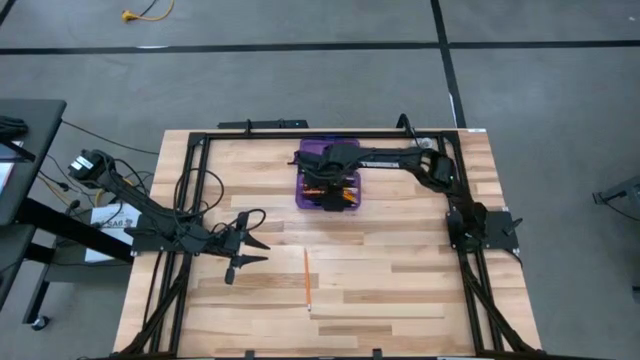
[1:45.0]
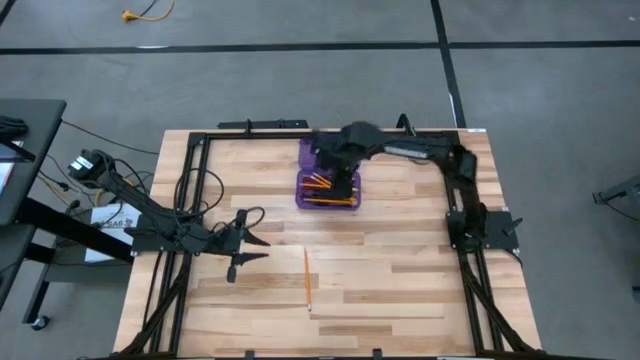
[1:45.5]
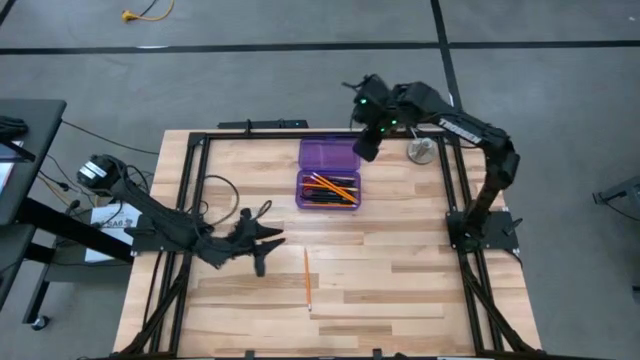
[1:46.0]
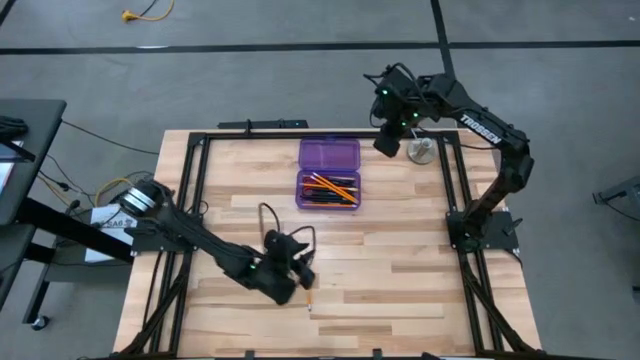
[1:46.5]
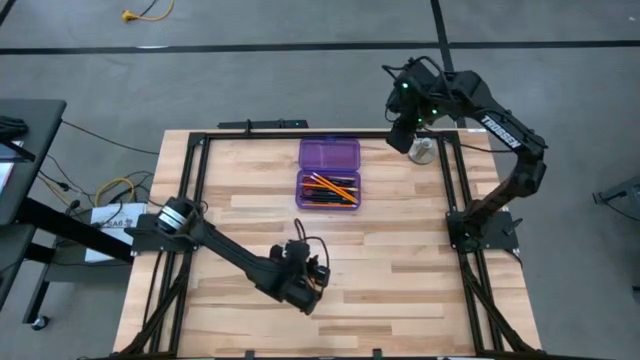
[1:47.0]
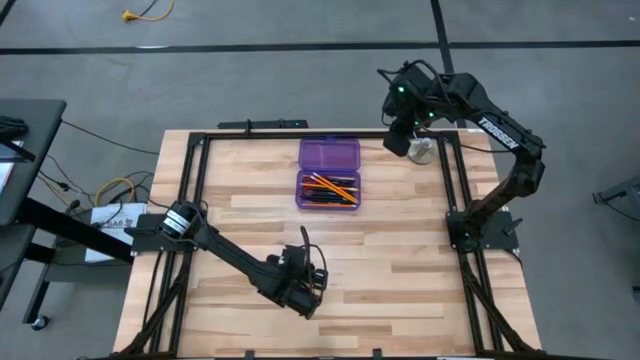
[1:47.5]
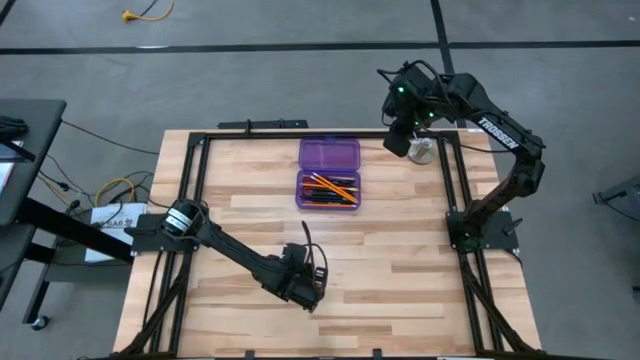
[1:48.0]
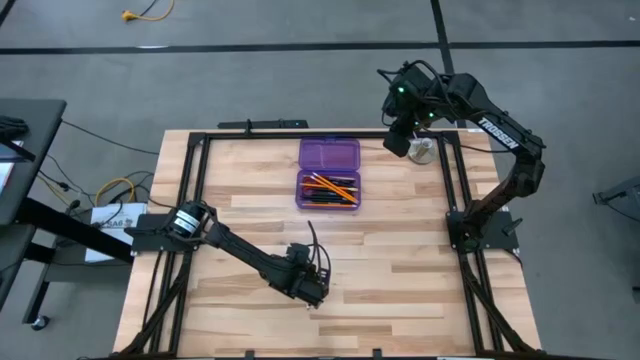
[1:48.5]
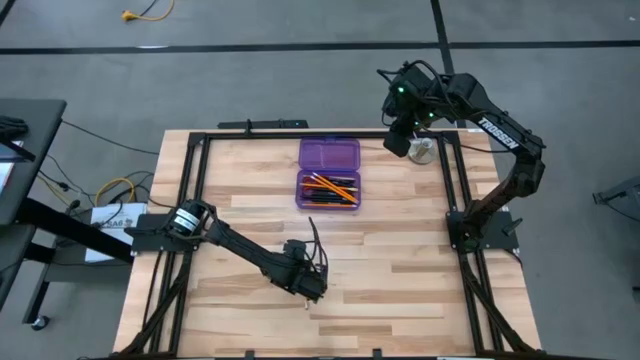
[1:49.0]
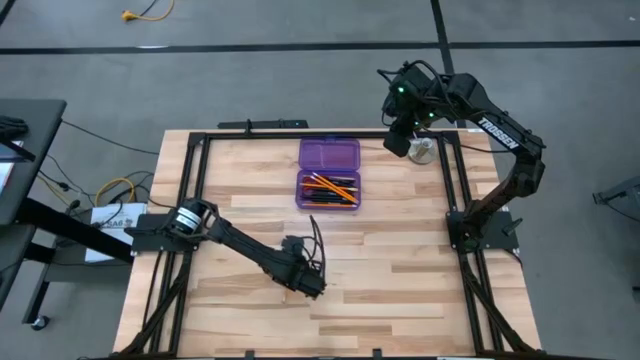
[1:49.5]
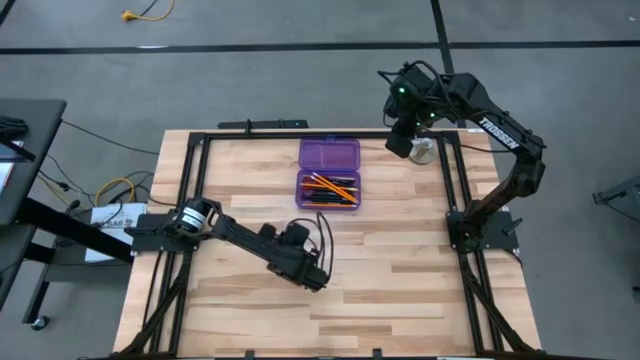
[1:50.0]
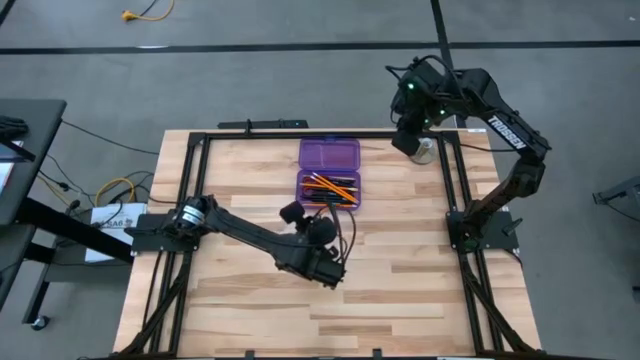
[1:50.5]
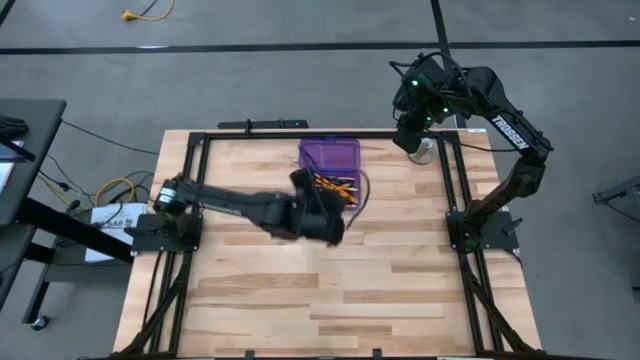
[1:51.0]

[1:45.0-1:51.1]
Task: Pick & place school supplies into a supply box
Put the orange pencil into the violet supply box

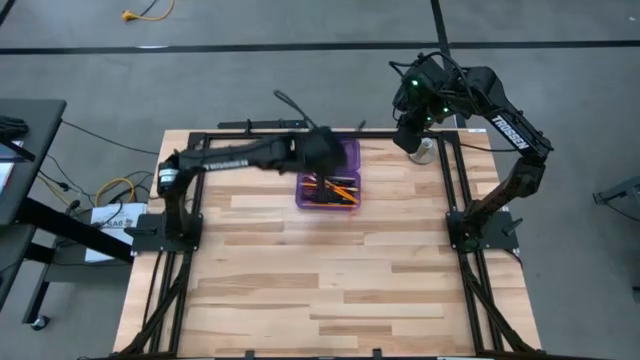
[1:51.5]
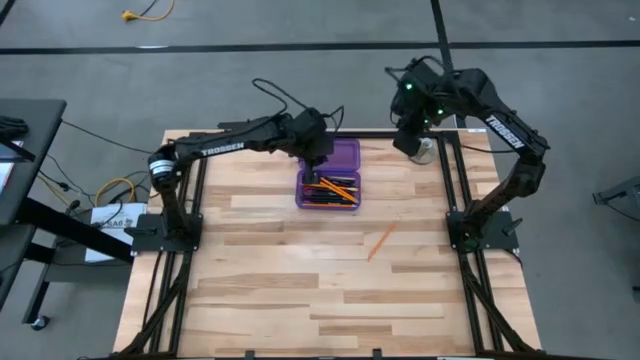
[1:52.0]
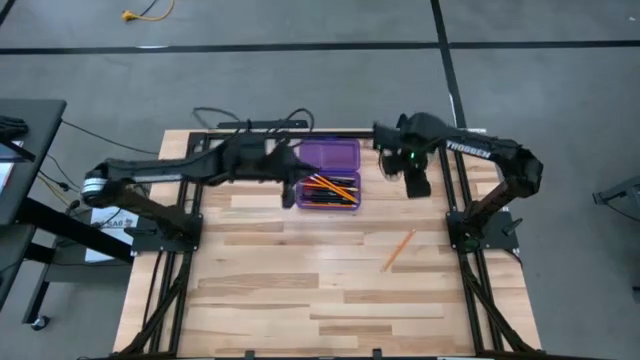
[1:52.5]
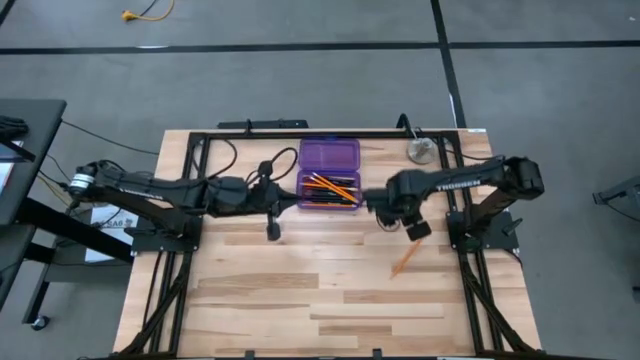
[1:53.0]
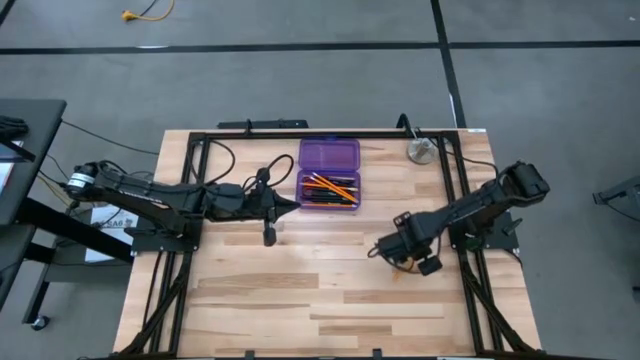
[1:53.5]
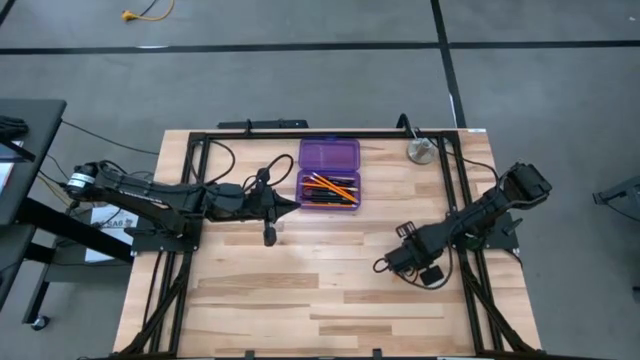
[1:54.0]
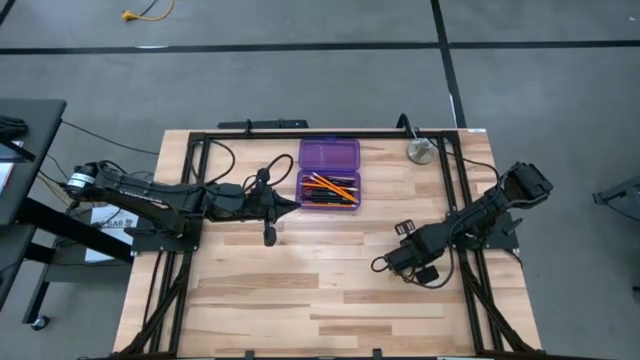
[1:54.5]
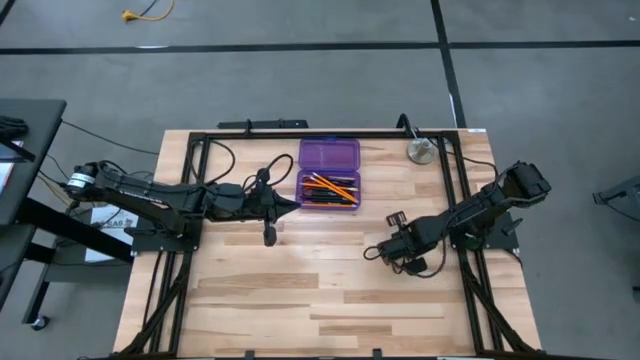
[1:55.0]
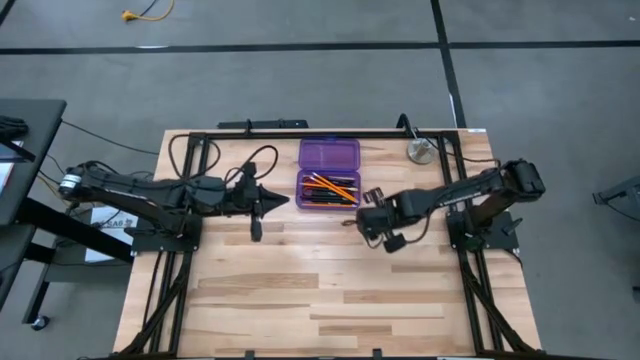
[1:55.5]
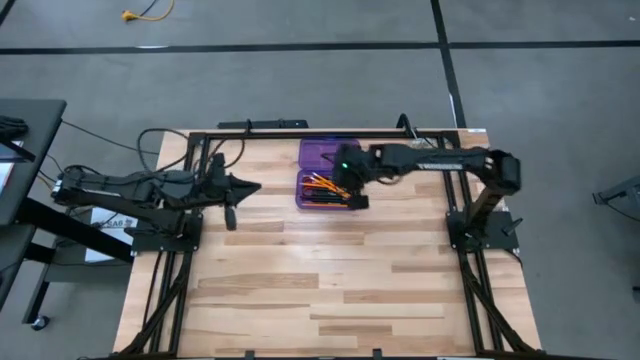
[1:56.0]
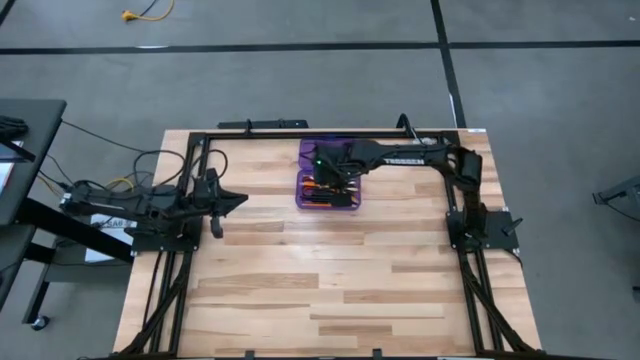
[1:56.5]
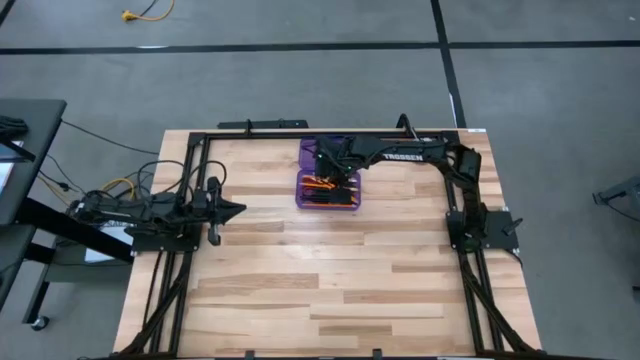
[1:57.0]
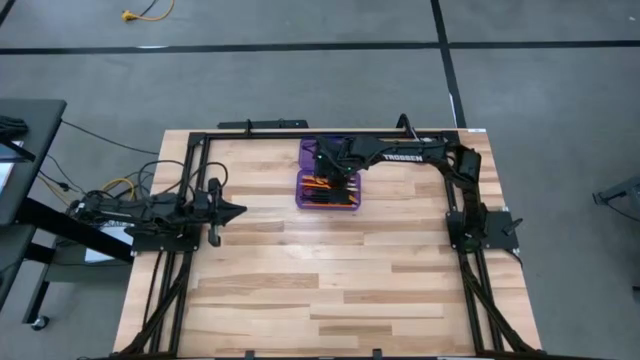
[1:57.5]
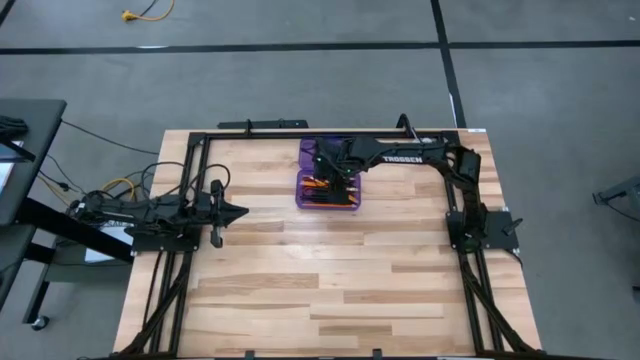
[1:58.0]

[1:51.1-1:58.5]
Put the orange pencil into the violet supply box

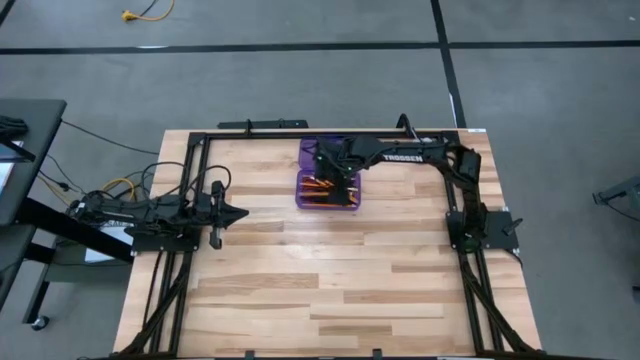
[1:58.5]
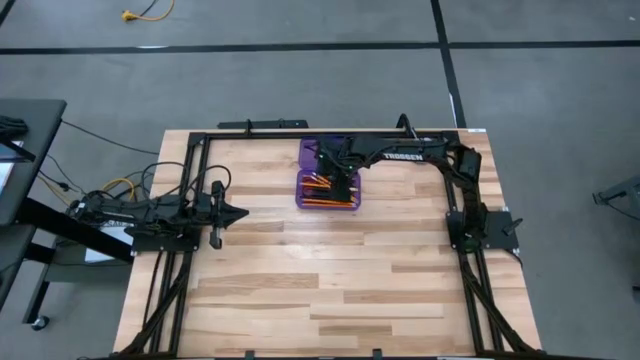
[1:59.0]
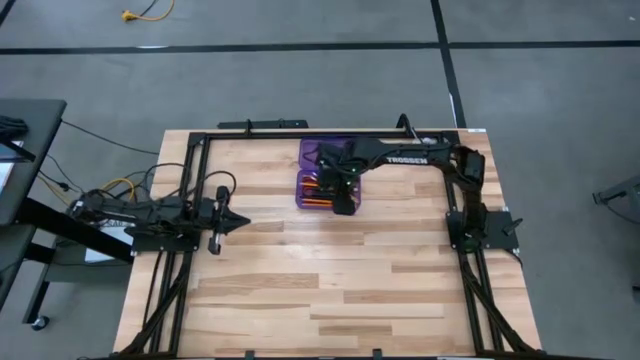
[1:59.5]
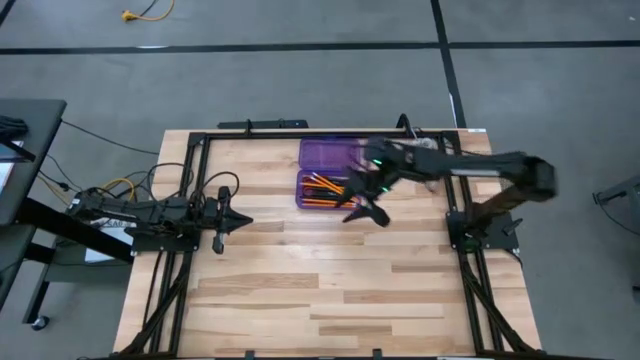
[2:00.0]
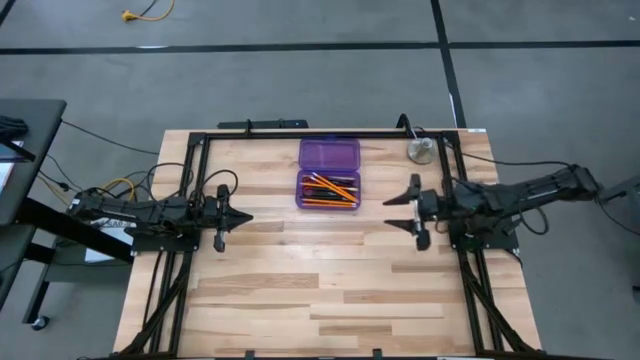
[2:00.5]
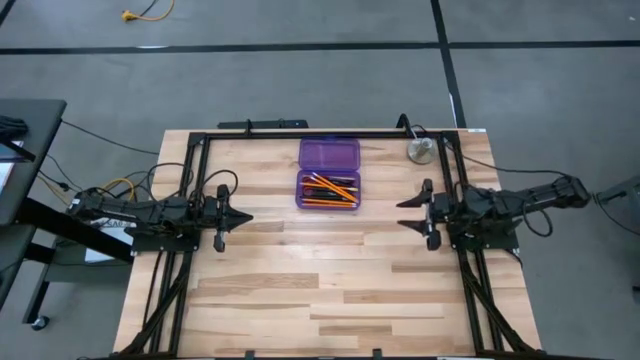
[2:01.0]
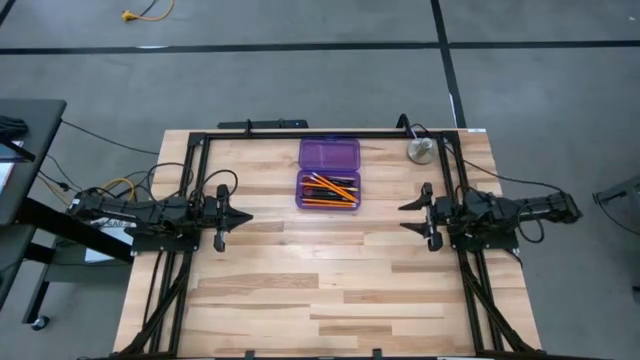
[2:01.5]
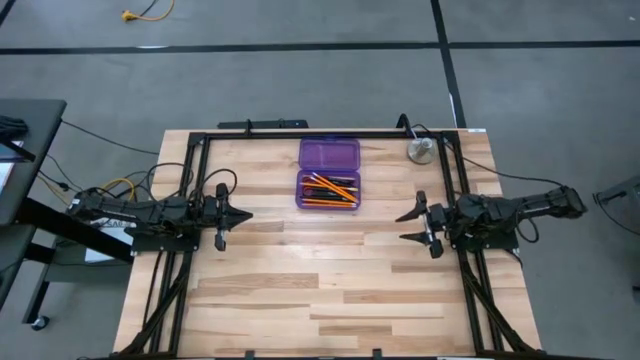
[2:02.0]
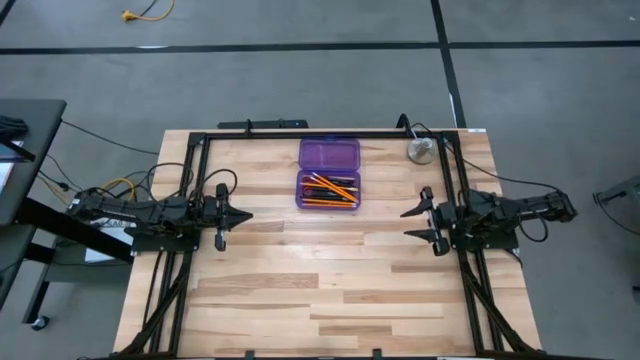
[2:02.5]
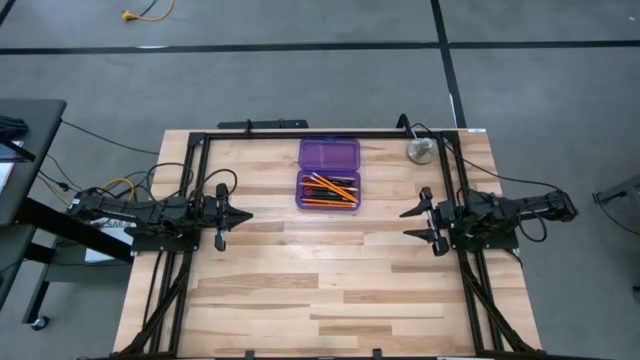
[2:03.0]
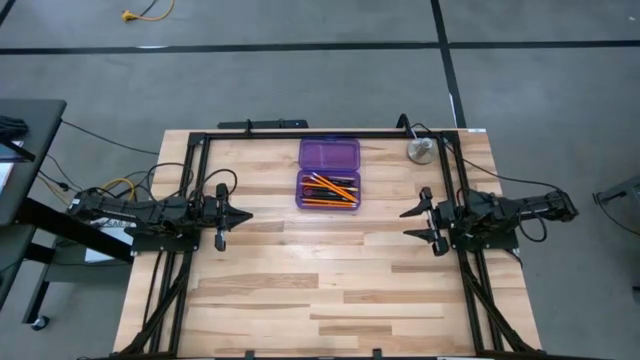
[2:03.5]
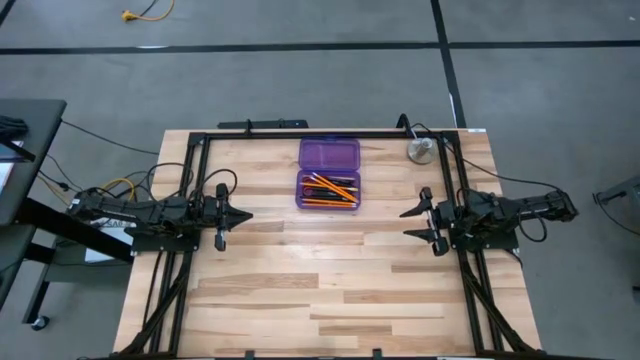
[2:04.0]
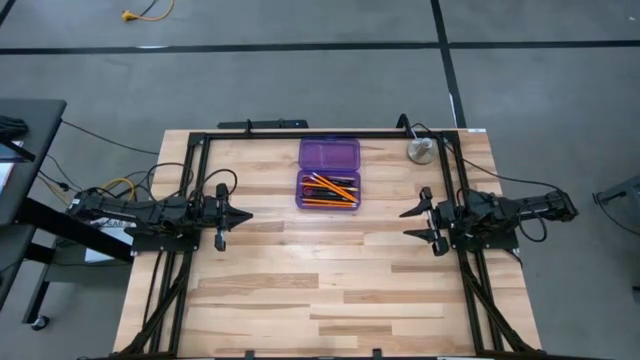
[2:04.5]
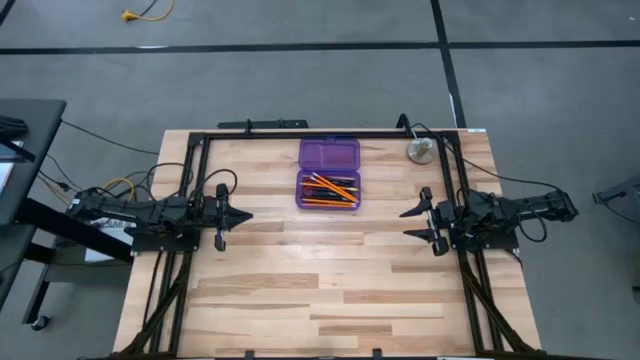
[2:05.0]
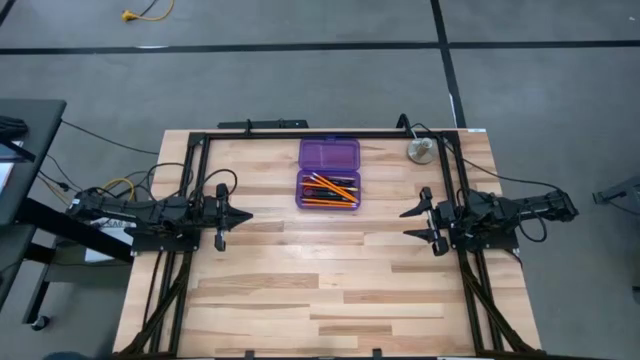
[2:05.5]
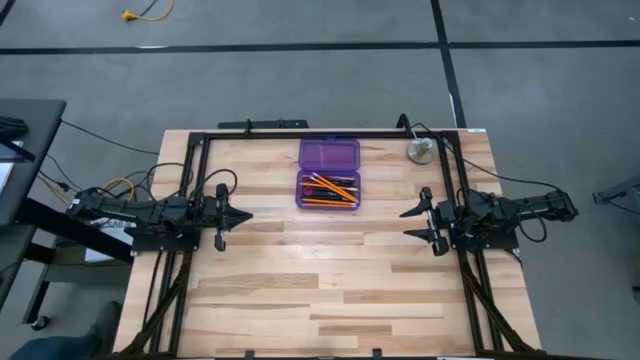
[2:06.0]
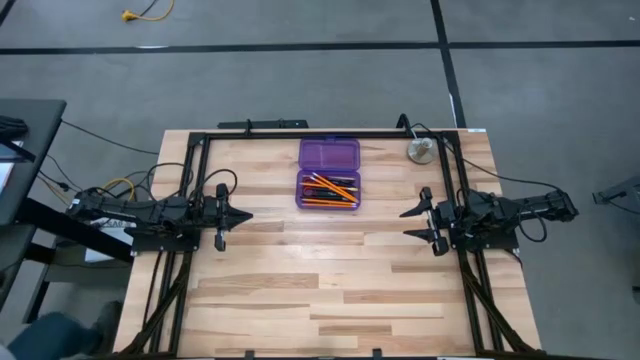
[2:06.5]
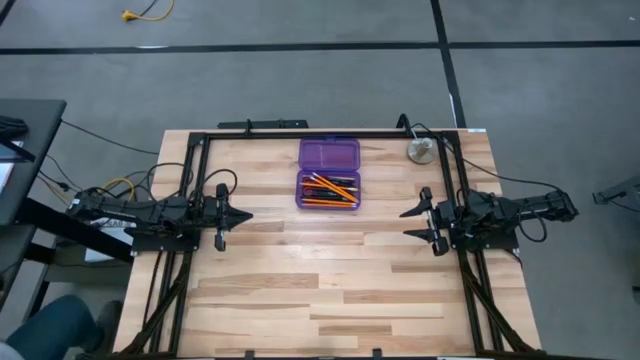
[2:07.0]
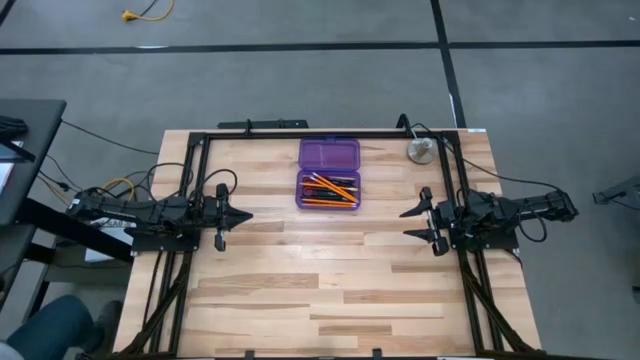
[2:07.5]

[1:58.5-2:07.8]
Return to Home Position
